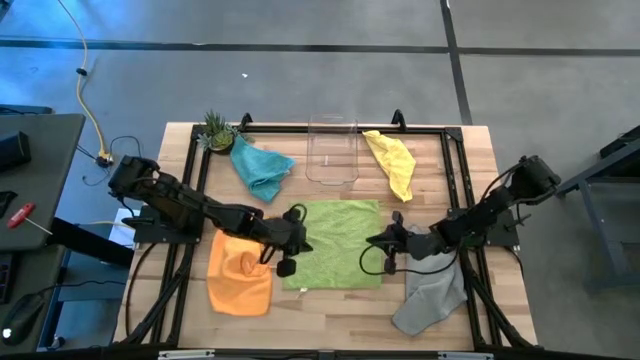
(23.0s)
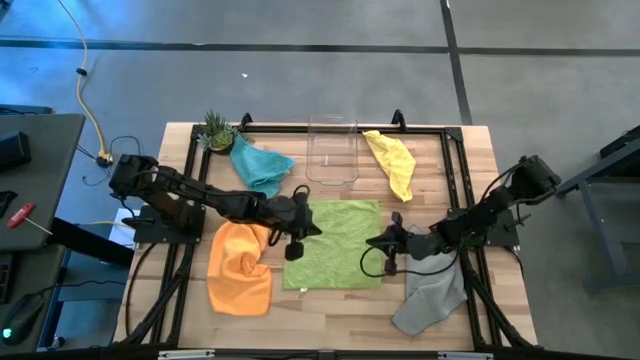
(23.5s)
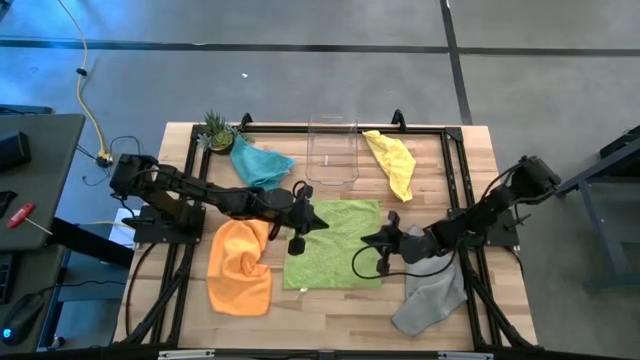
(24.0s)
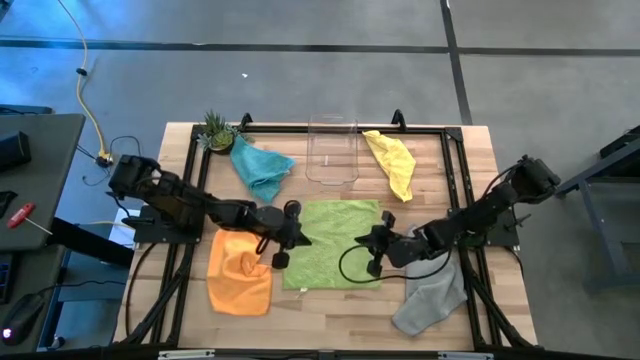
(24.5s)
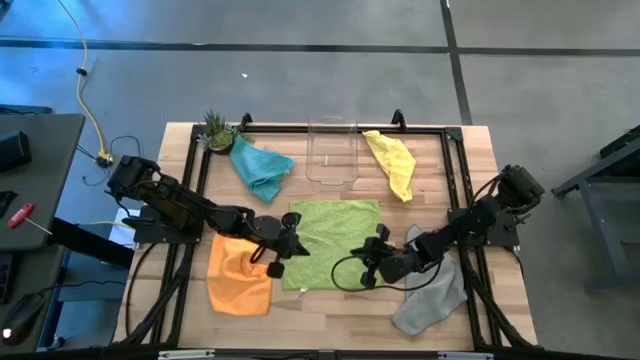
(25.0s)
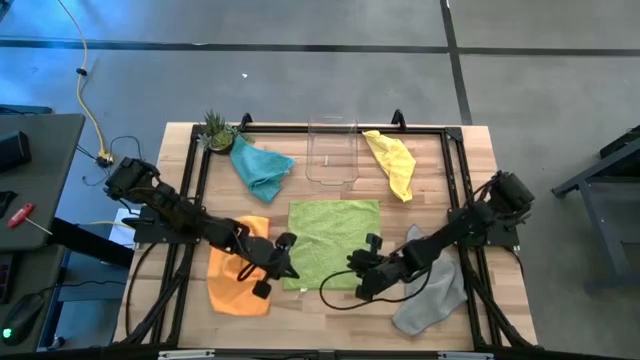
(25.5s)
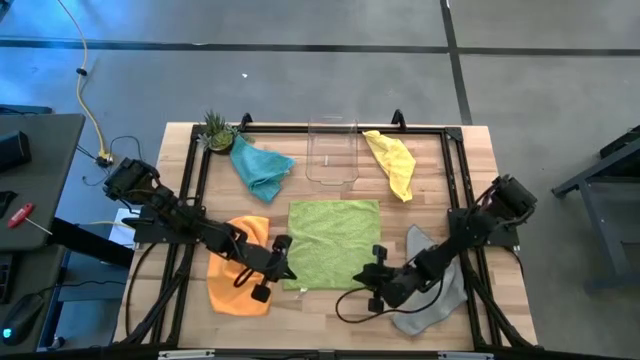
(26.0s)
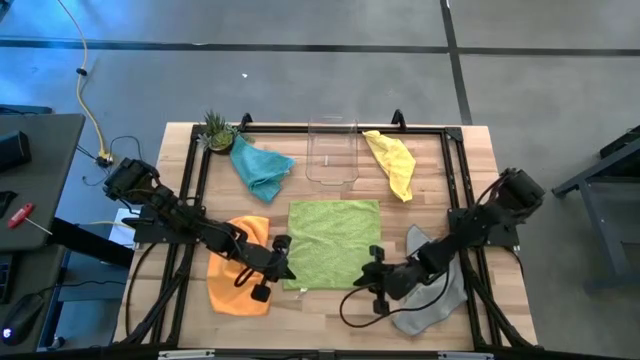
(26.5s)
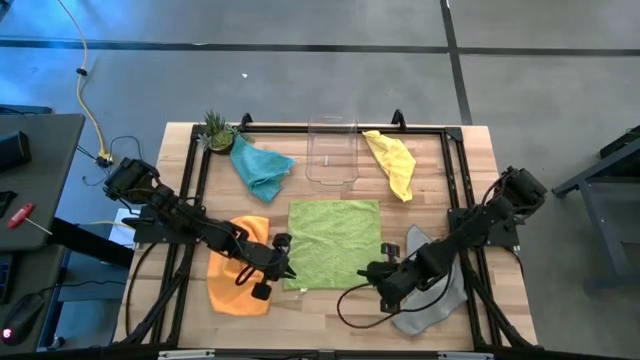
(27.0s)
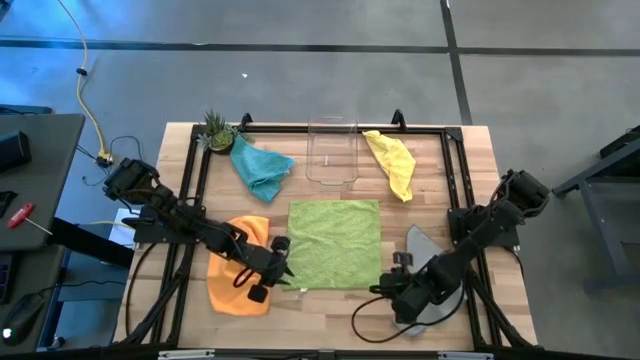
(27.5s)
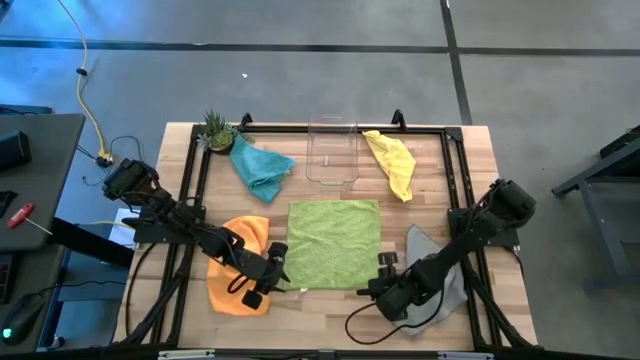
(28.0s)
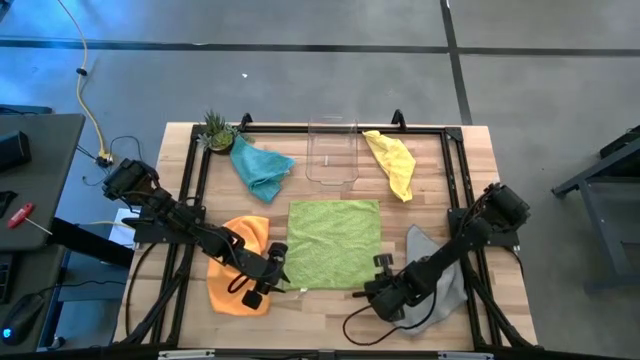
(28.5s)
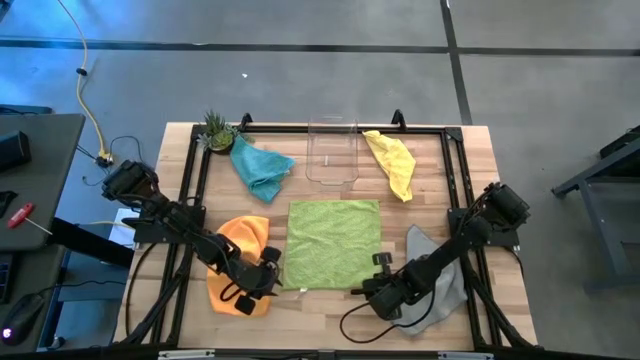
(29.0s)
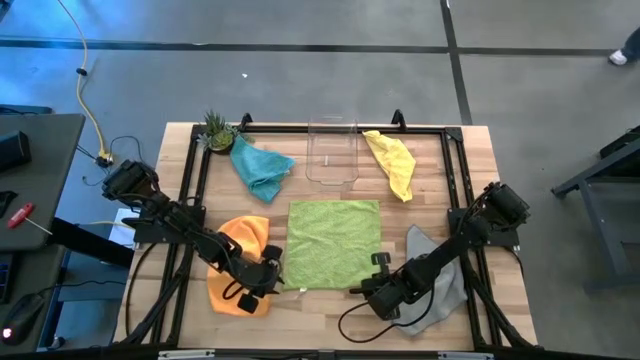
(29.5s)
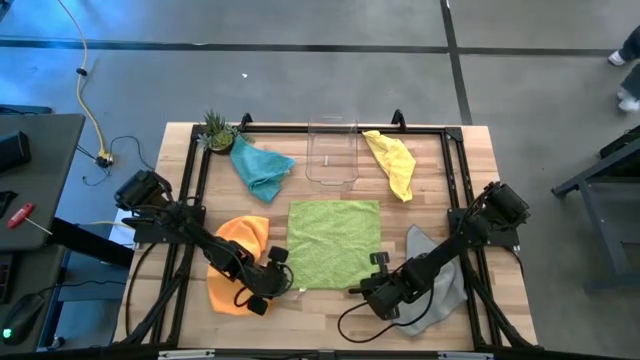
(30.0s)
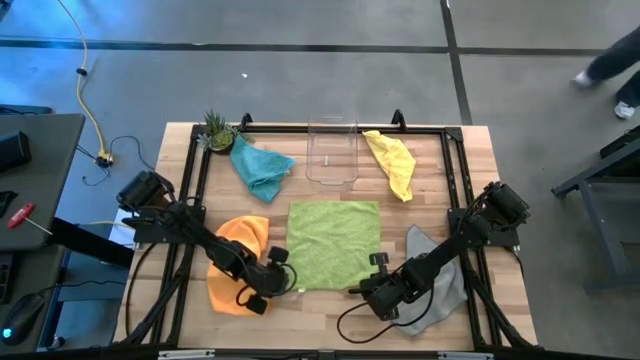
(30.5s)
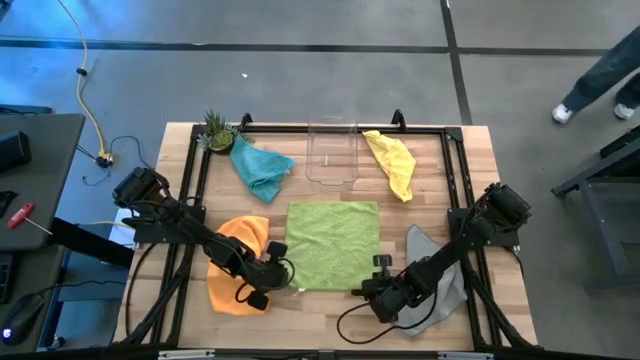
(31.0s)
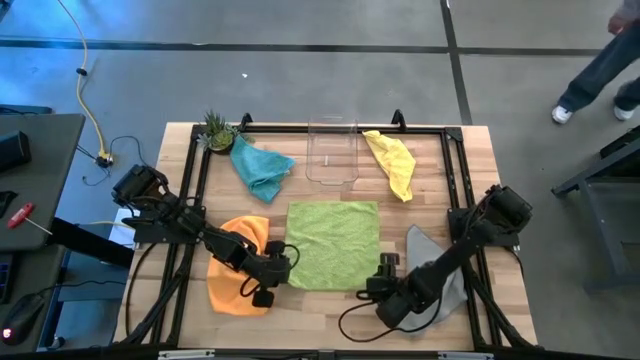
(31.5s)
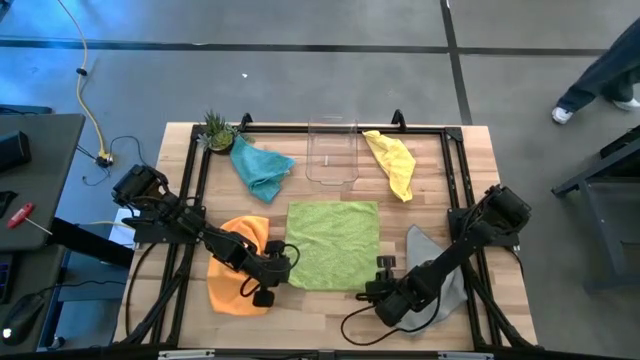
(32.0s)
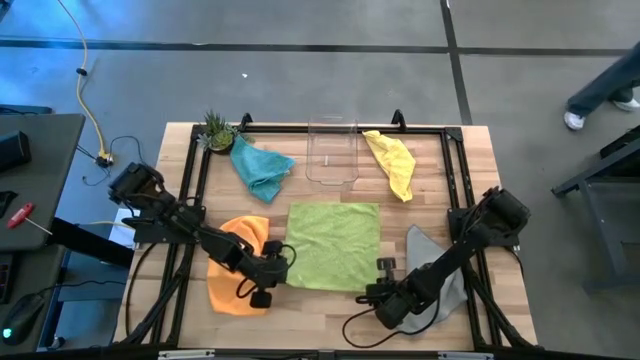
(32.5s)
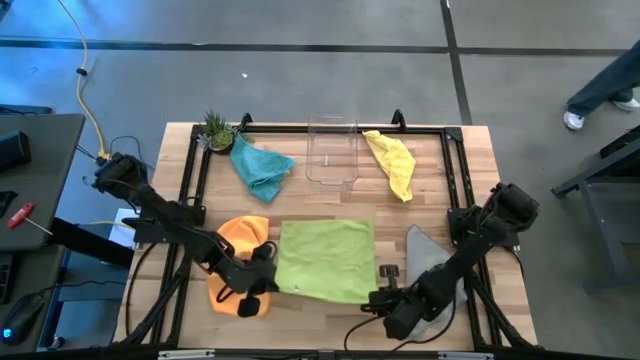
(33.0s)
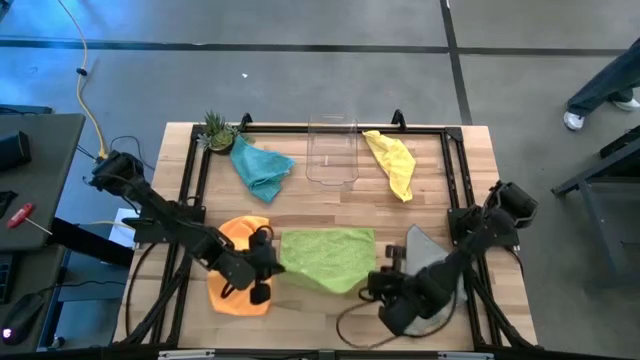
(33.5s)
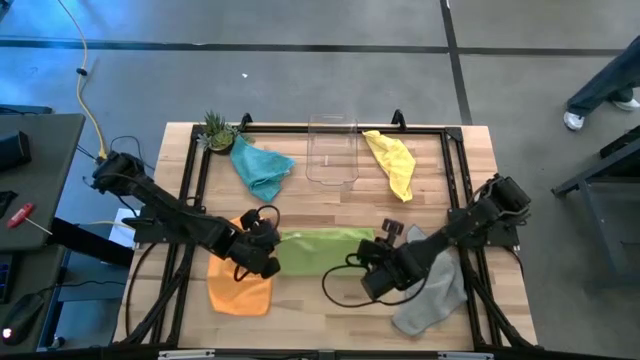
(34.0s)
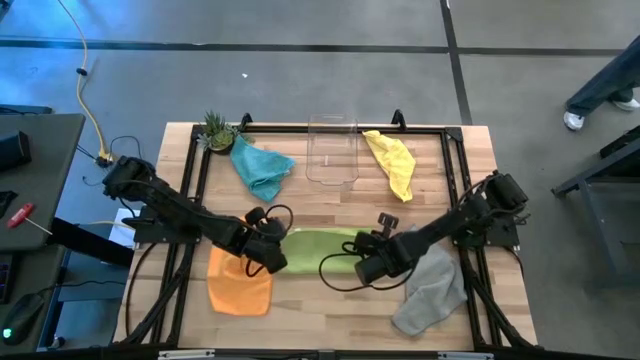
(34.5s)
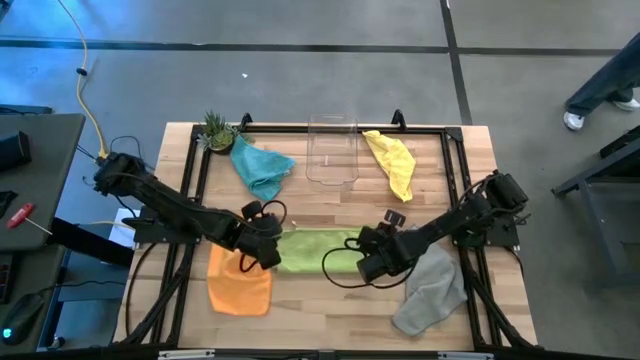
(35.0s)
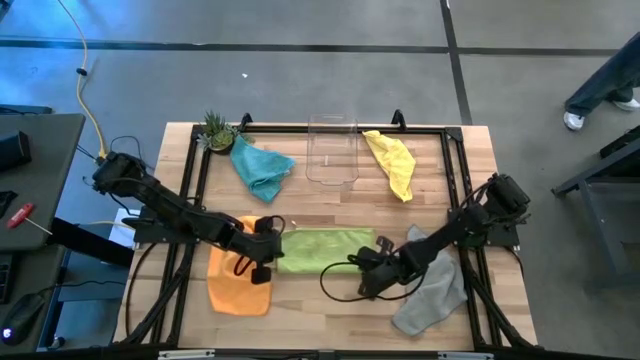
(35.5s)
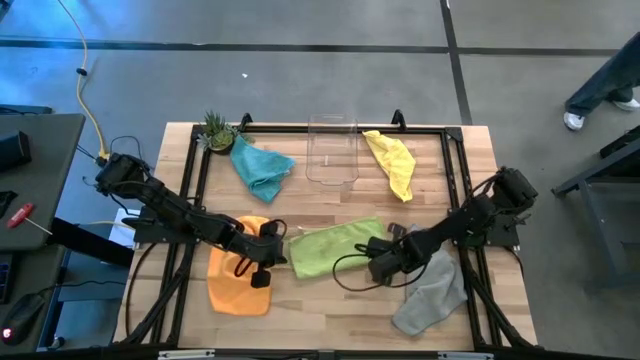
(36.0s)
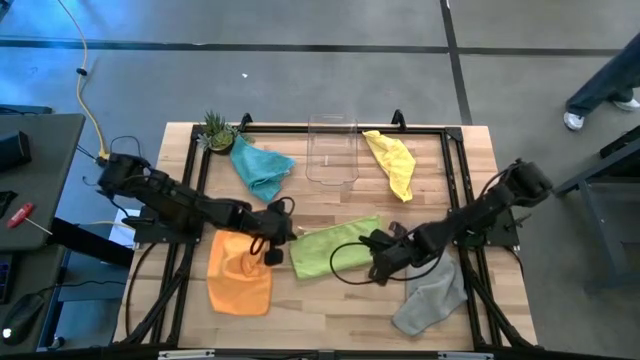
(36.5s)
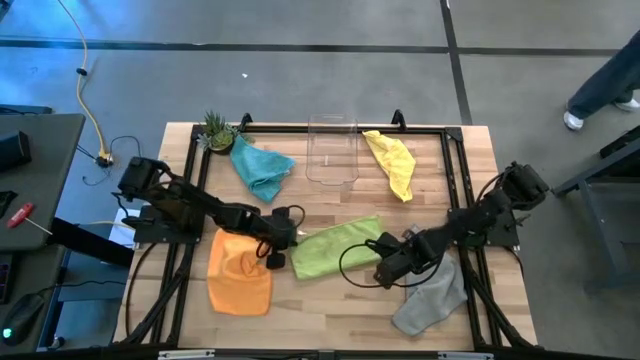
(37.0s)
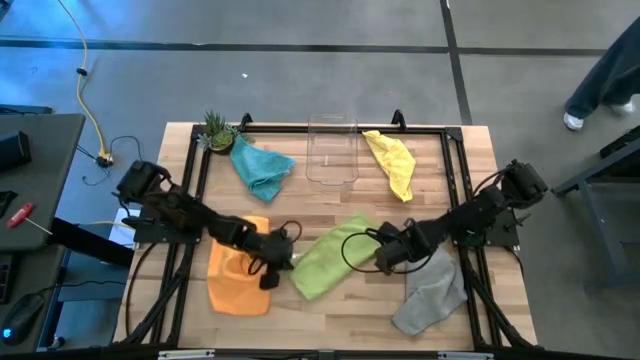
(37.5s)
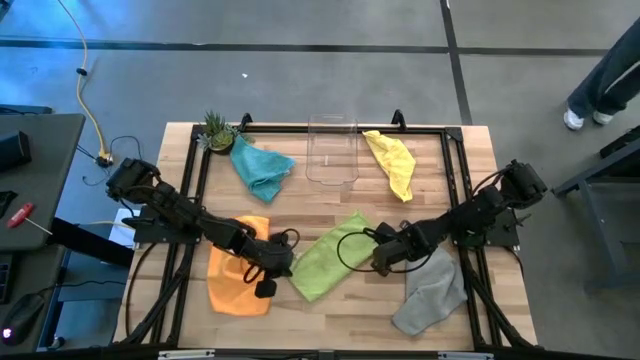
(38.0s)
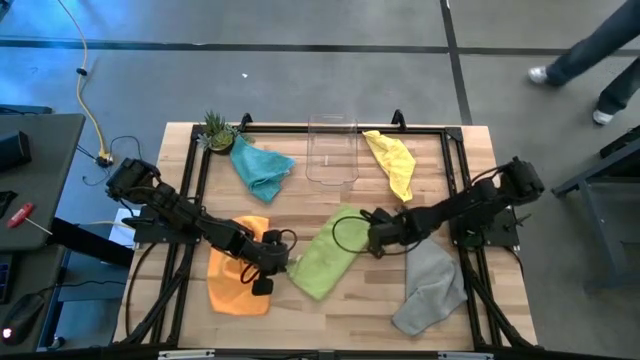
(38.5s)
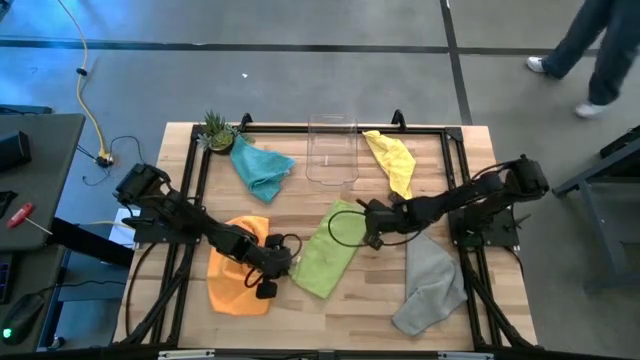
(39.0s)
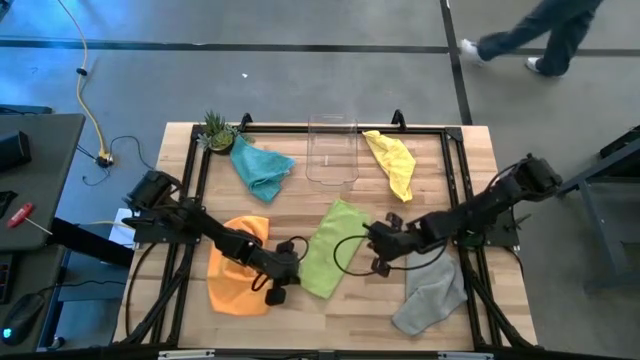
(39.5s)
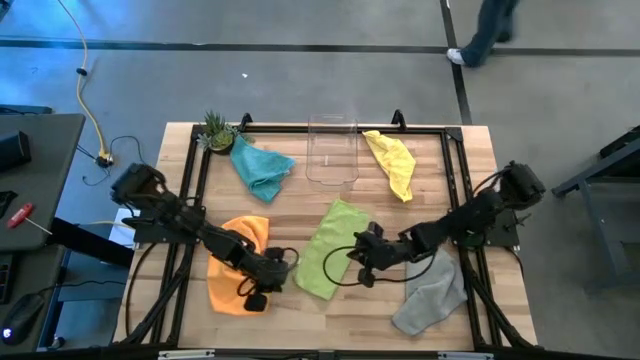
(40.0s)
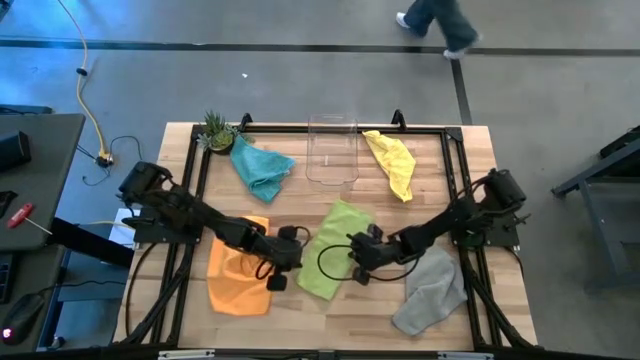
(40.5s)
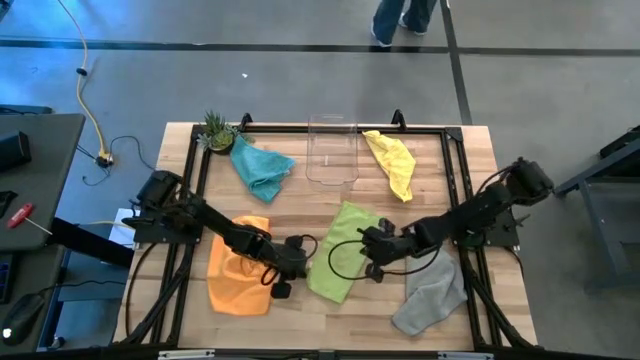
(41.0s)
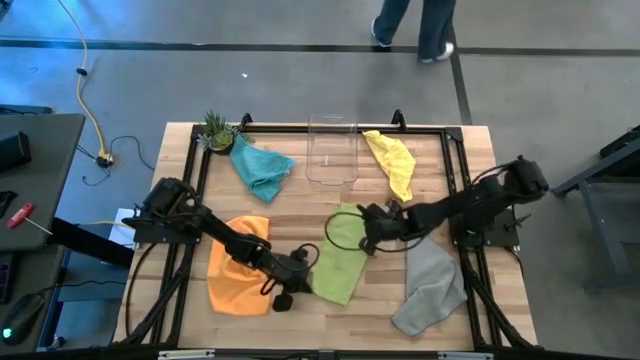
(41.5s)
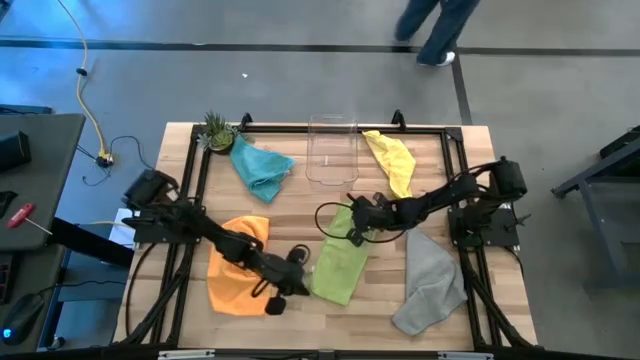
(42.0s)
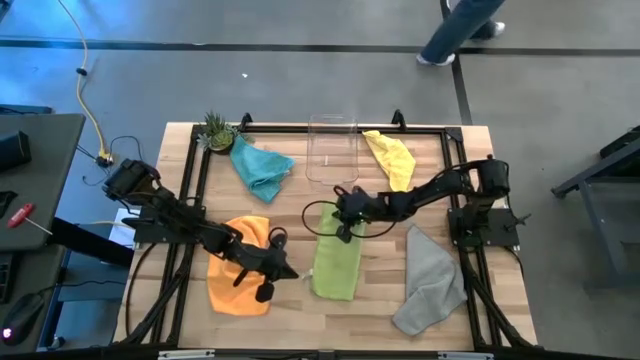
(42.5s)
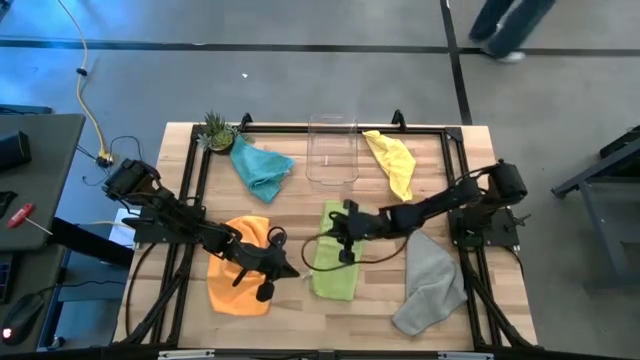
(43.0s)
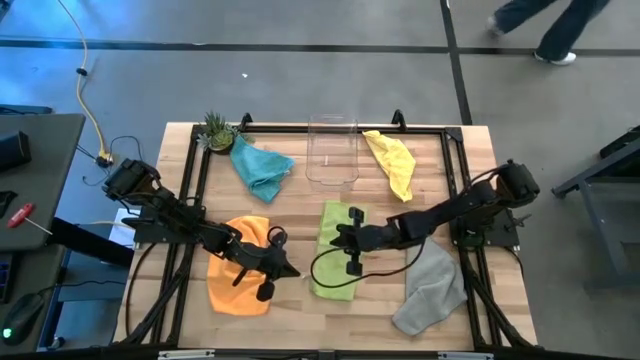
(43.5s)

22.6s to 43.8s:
Task: Fold microfiber towels
Fold the green microfiber cloth
